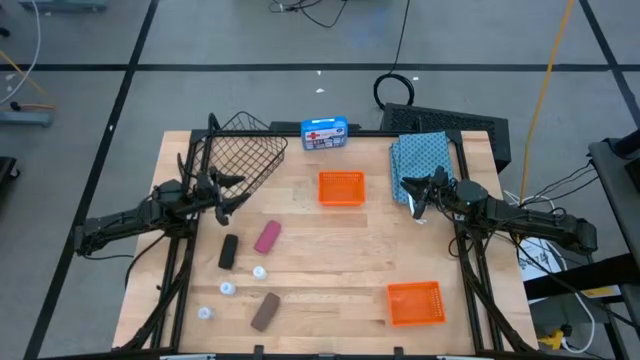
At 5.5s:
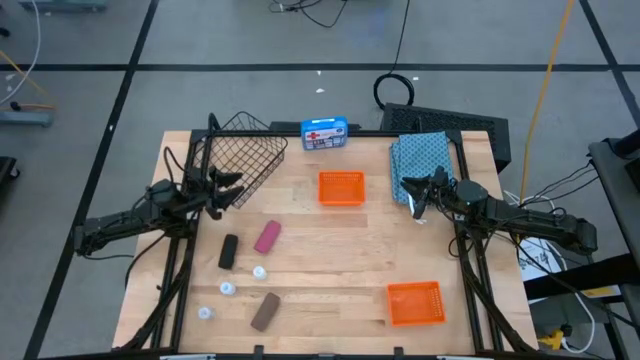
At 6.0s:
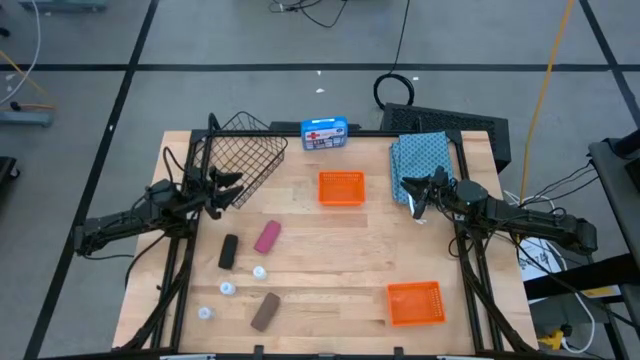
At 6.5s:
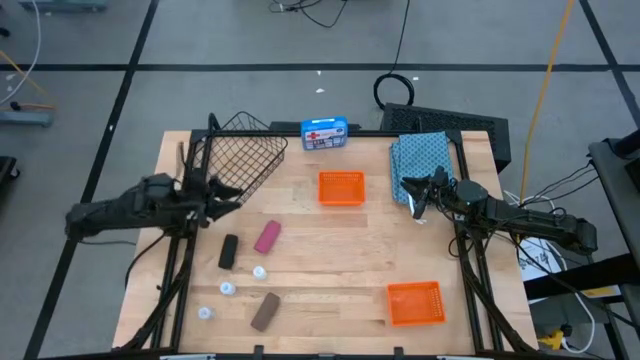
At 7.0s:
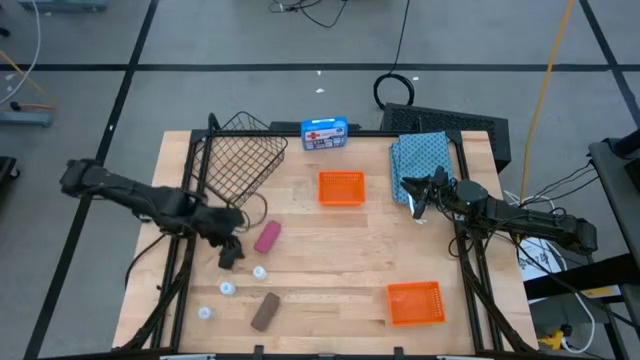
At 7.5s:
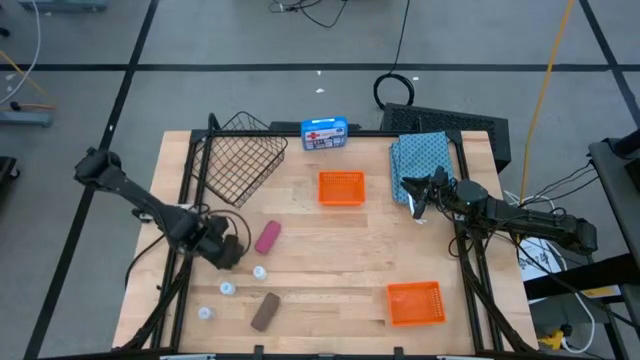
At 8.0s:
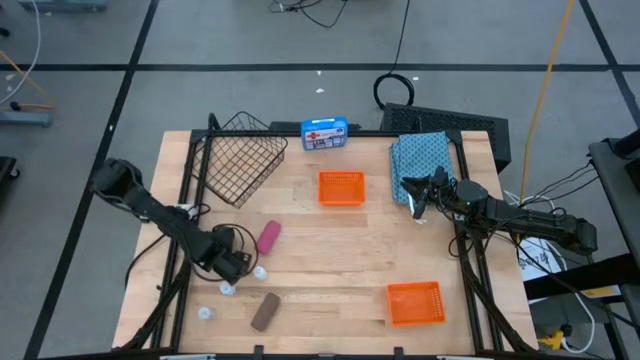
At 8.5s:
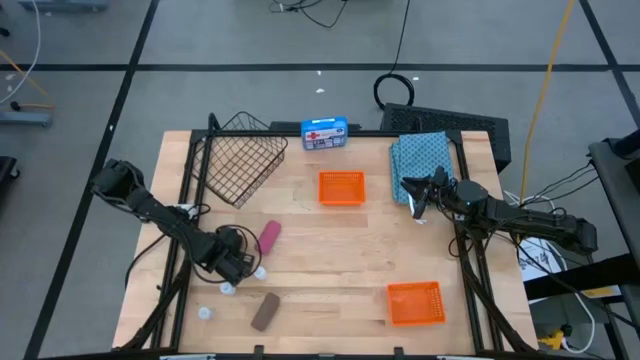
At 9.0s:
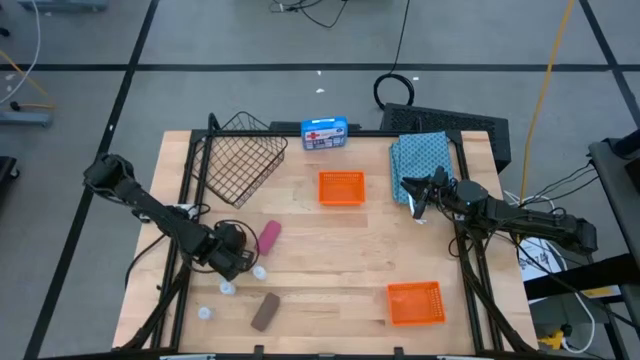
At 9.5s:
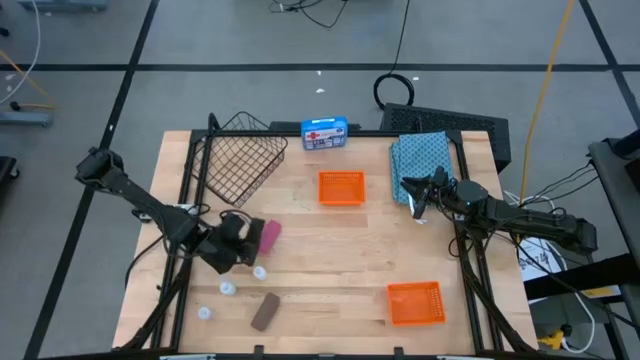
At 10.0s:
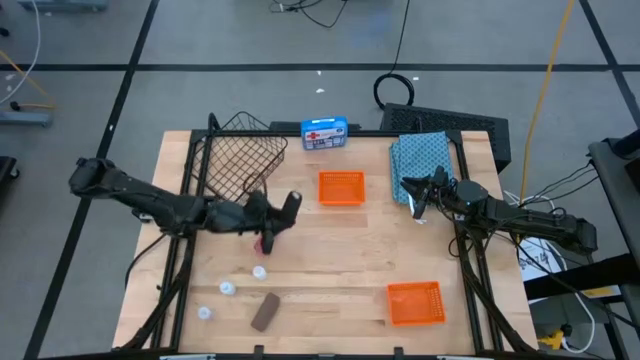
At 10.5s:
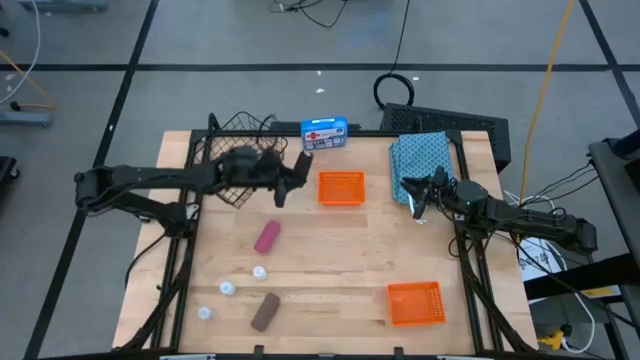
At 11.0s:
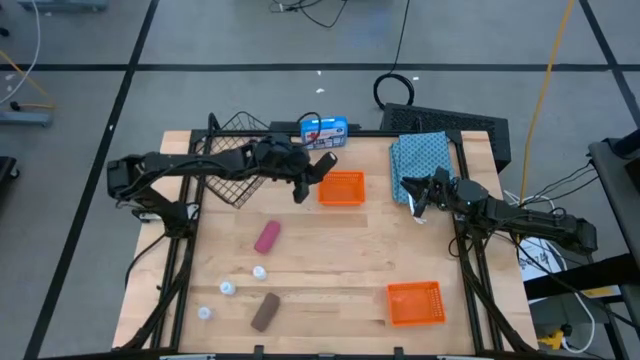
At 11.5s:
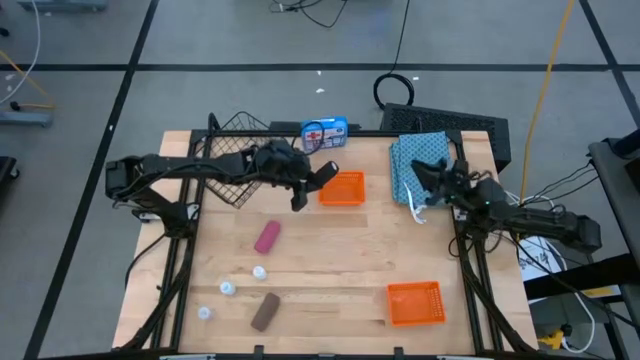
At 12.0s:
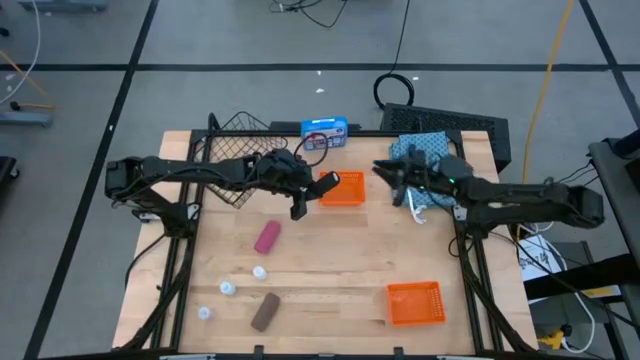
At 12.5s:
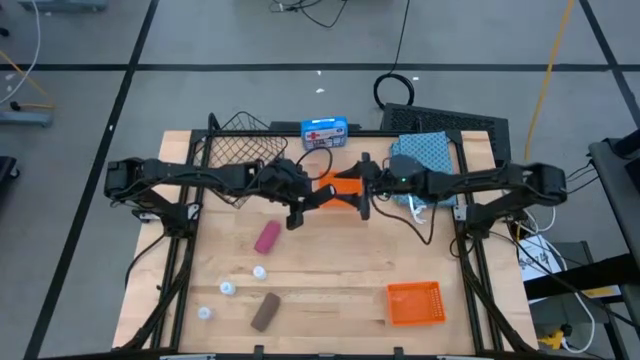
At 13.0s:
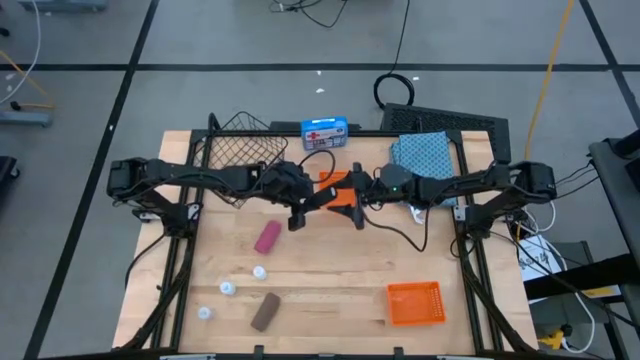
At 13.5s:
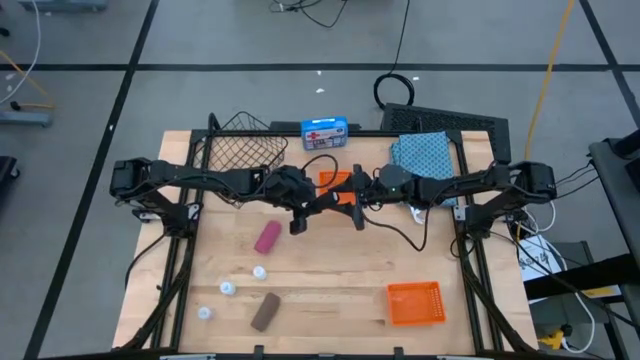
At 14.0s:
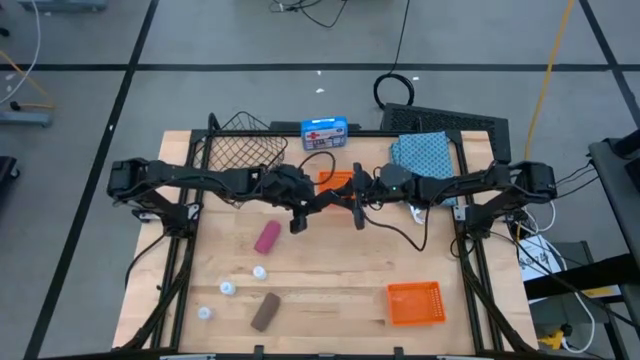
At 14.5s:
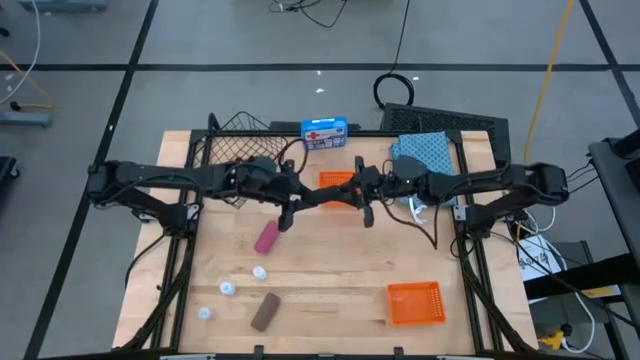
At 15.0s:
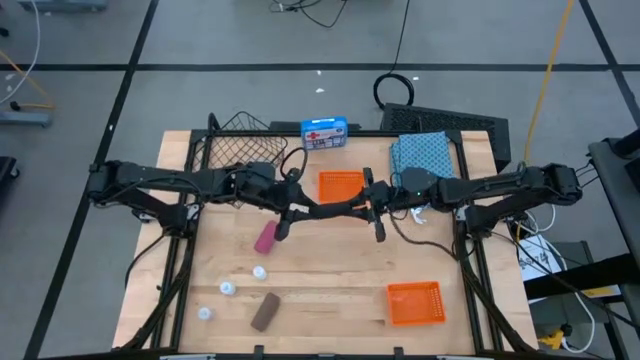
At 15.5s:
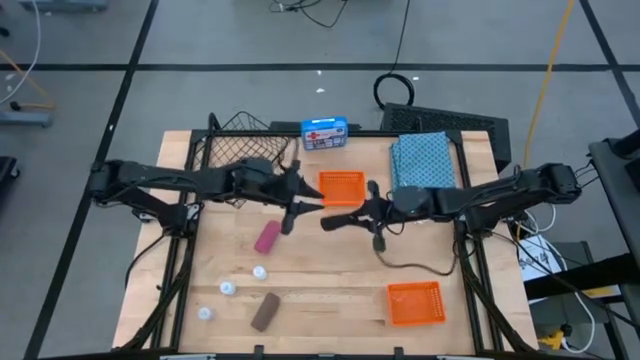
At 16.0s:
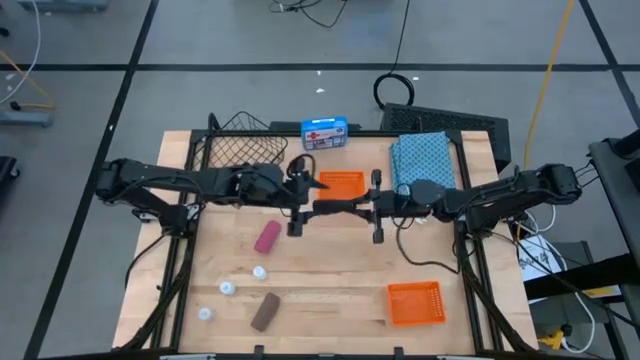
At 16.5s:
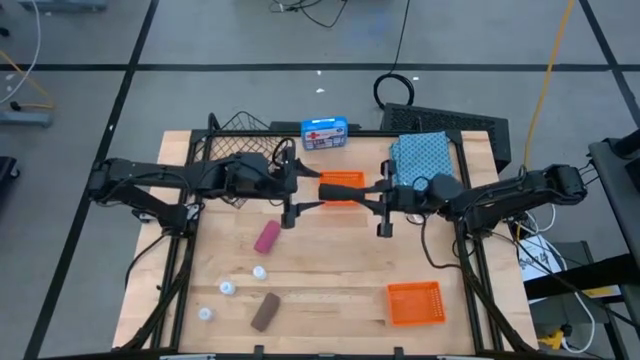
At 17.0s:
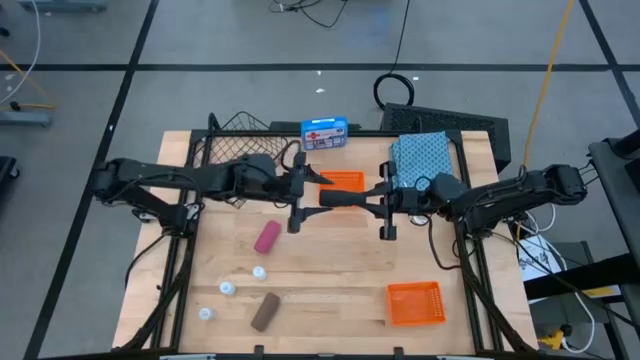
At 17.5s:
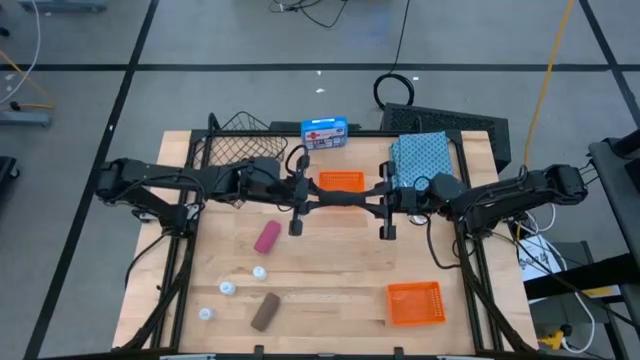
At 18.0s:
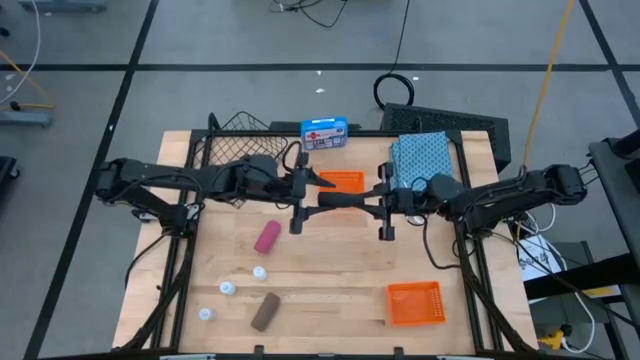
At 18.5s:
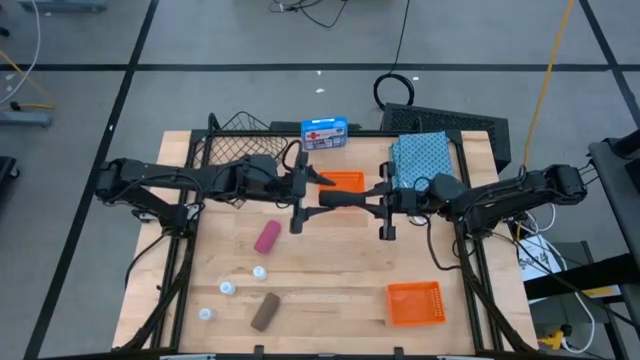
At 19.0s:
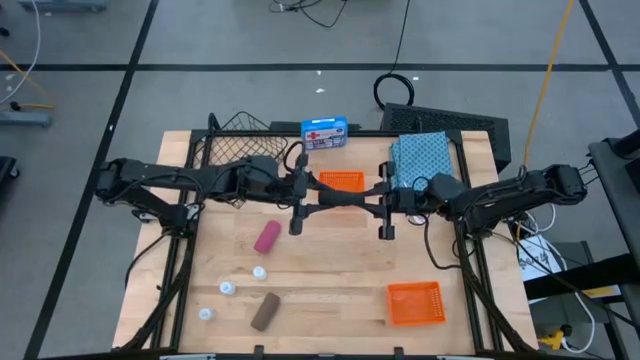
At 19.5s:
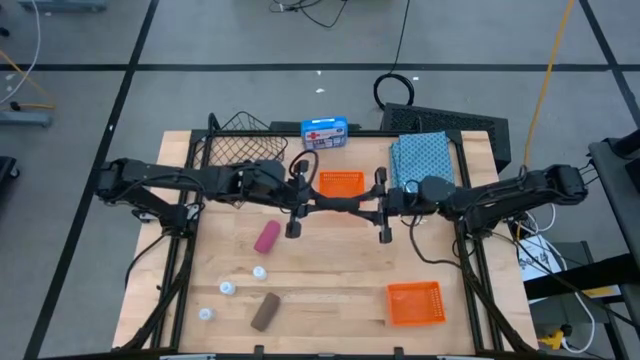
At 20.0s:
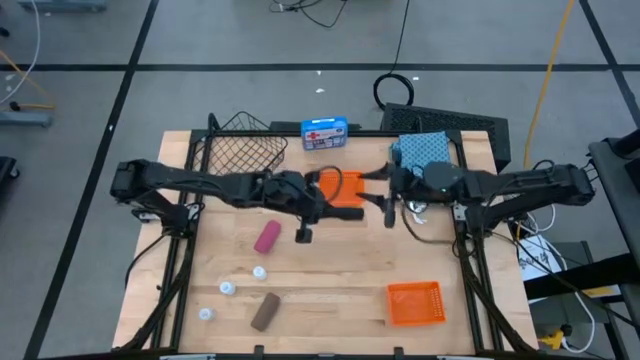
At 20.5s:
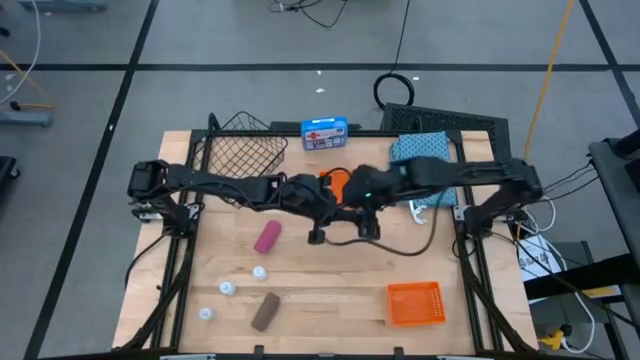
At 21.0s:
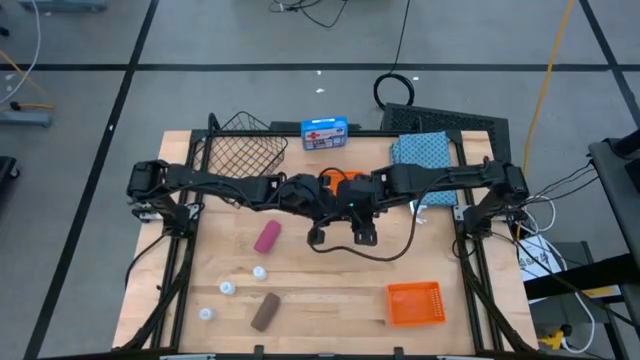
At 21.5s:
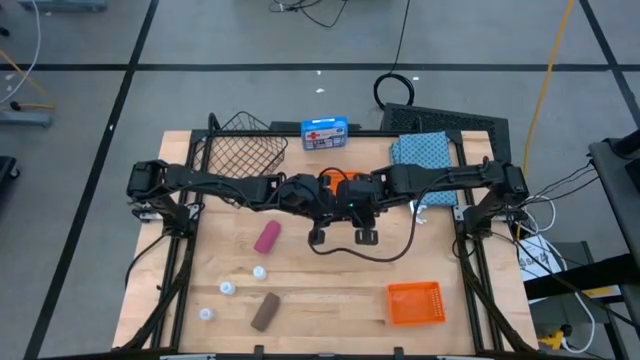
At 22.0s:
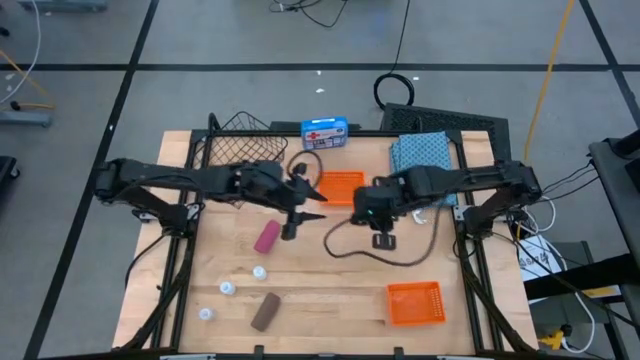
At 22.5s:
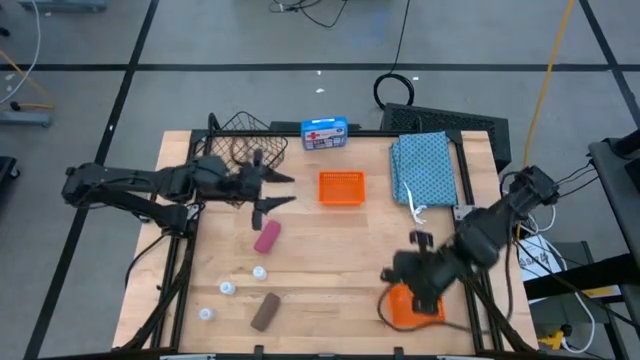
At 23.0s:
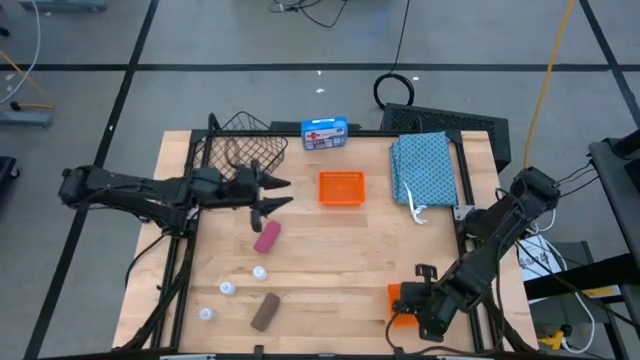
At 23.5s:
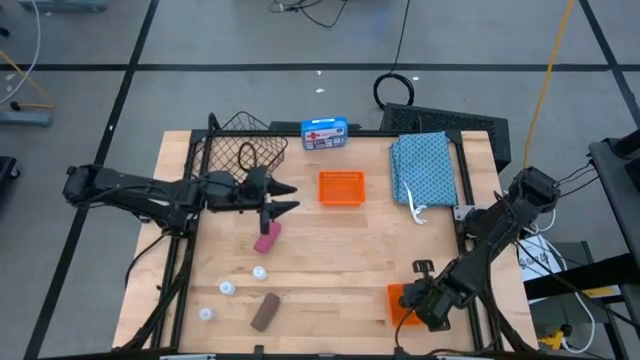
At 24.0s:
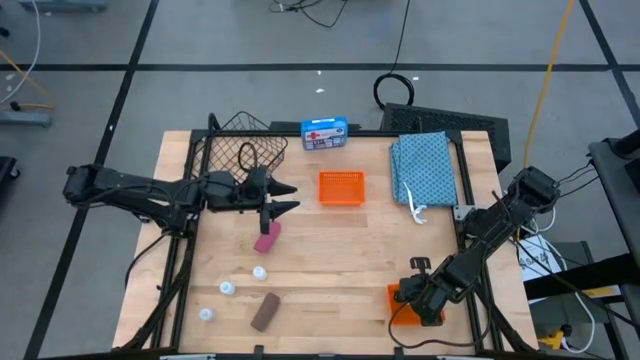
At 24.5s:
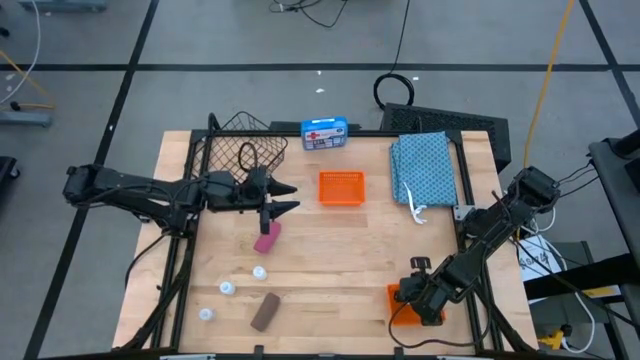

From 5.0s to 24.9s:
Task: Pick & place medical supplies in basket/bin
Put the black bandage into the bottom orange bin
